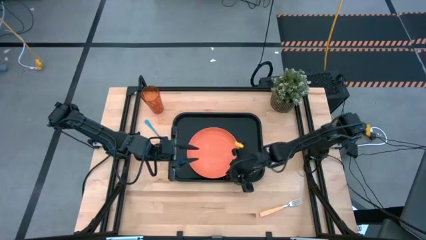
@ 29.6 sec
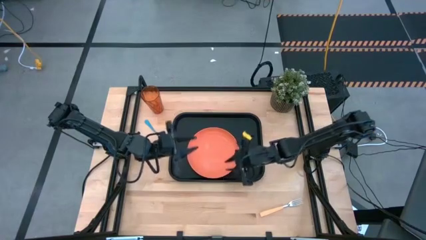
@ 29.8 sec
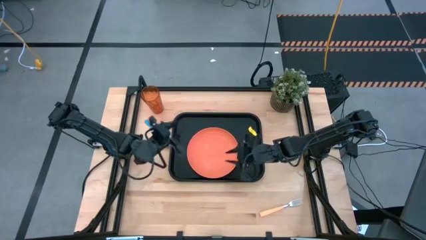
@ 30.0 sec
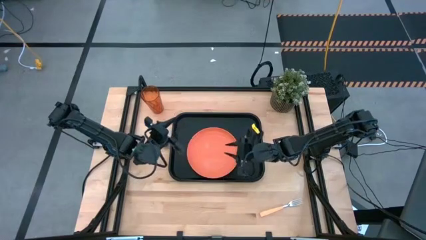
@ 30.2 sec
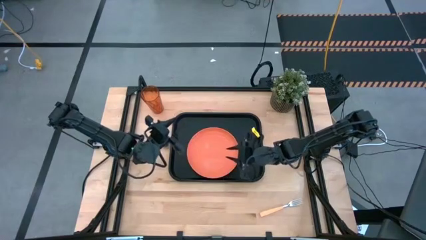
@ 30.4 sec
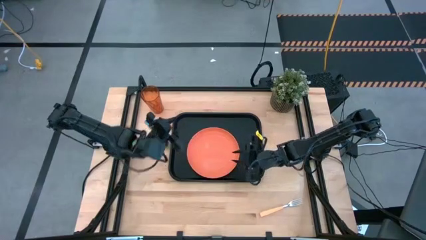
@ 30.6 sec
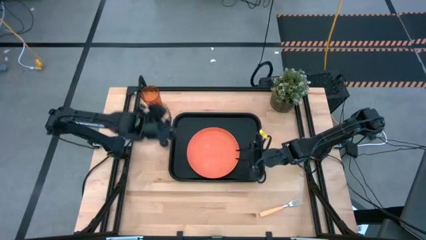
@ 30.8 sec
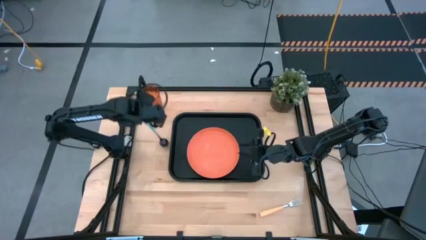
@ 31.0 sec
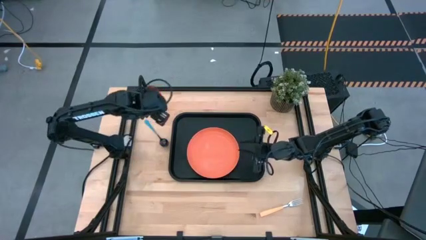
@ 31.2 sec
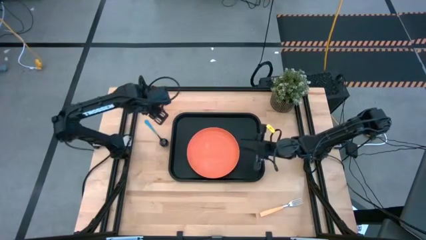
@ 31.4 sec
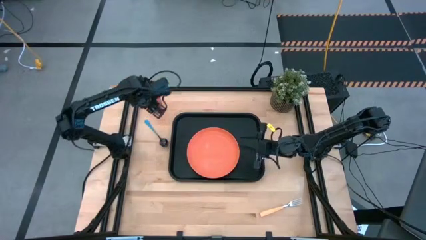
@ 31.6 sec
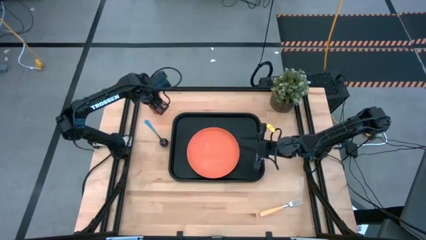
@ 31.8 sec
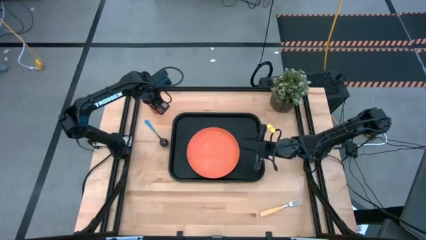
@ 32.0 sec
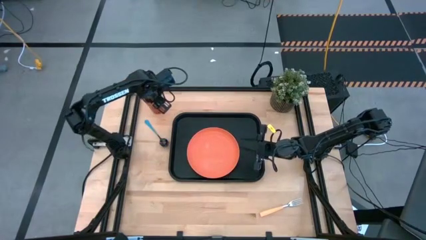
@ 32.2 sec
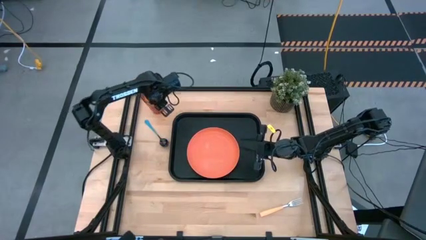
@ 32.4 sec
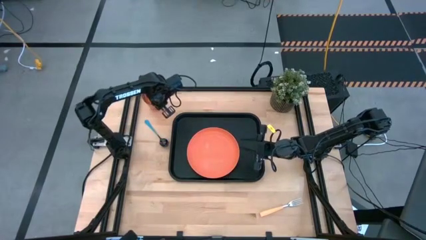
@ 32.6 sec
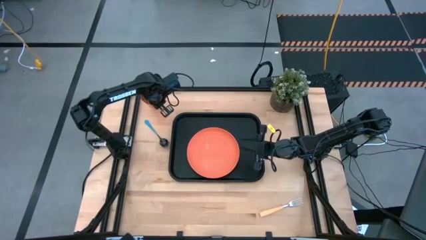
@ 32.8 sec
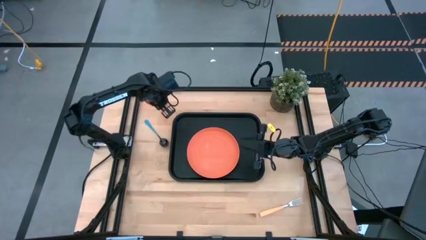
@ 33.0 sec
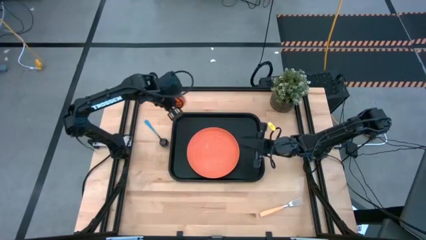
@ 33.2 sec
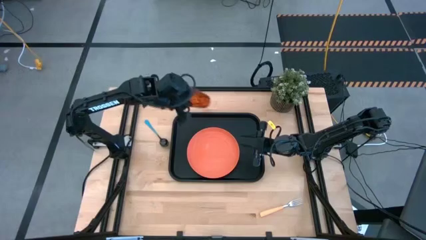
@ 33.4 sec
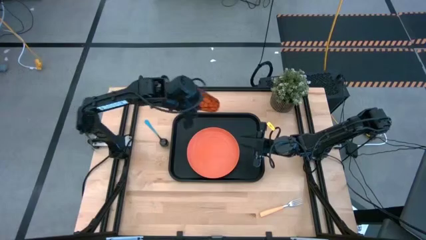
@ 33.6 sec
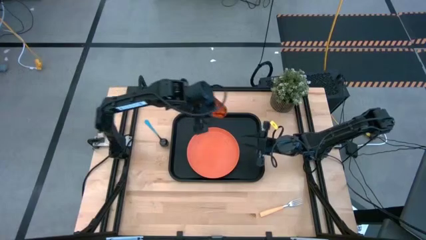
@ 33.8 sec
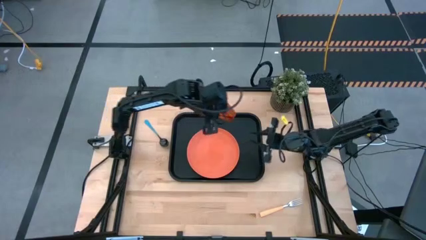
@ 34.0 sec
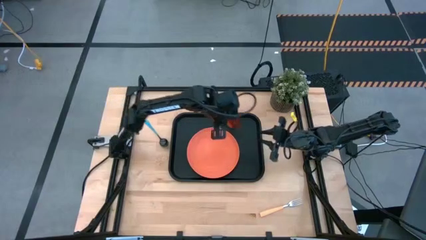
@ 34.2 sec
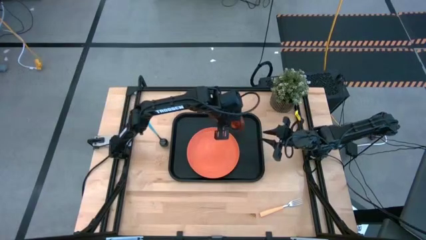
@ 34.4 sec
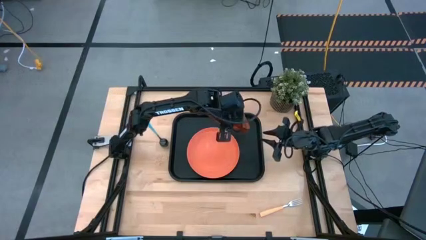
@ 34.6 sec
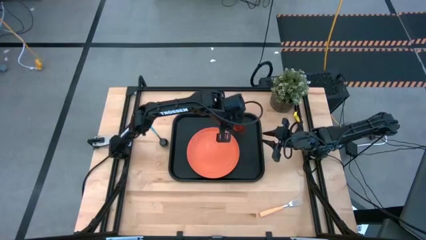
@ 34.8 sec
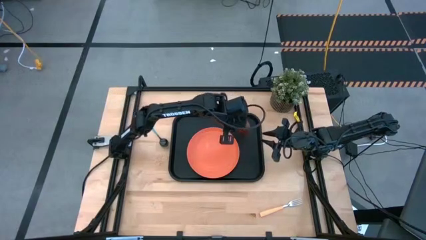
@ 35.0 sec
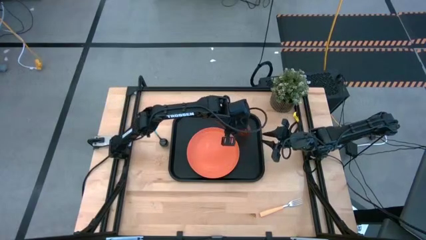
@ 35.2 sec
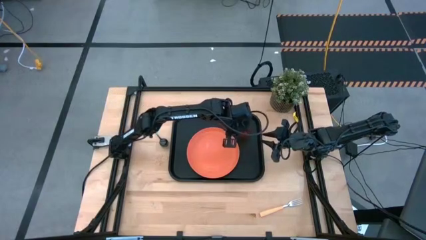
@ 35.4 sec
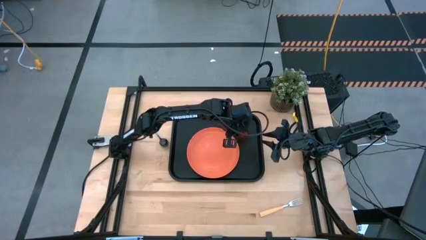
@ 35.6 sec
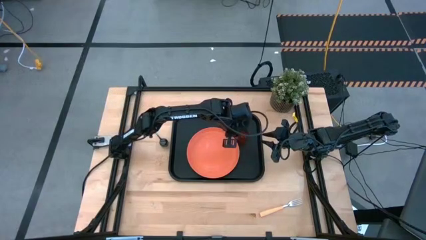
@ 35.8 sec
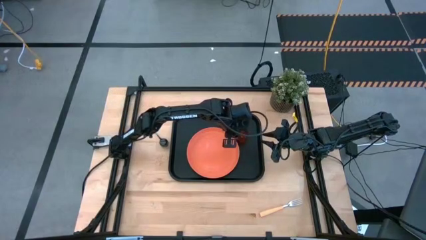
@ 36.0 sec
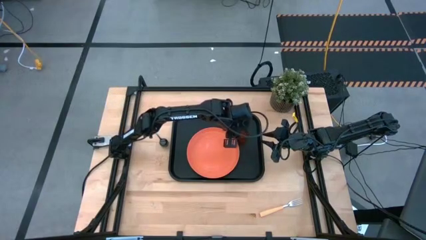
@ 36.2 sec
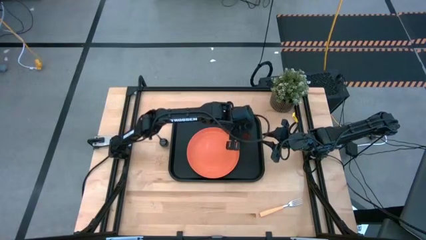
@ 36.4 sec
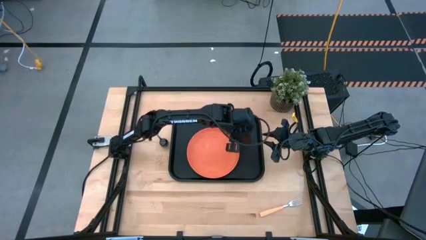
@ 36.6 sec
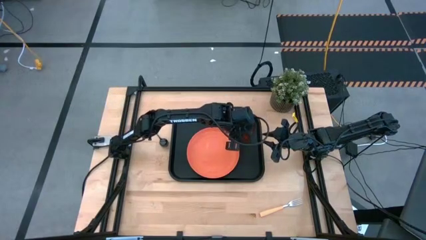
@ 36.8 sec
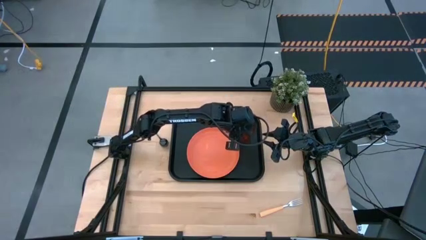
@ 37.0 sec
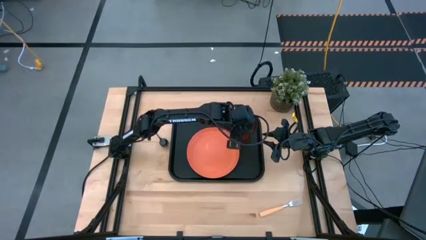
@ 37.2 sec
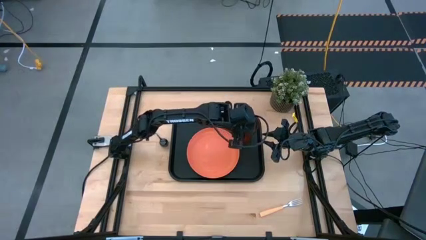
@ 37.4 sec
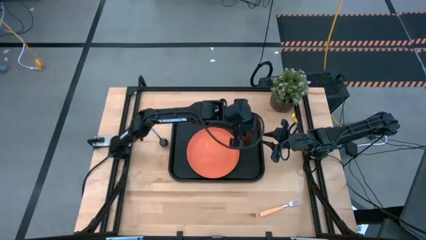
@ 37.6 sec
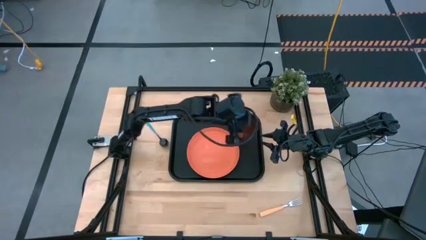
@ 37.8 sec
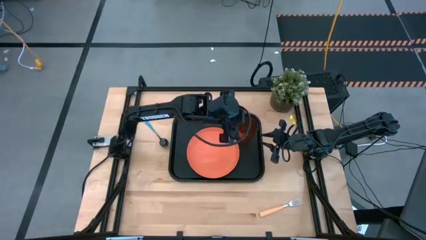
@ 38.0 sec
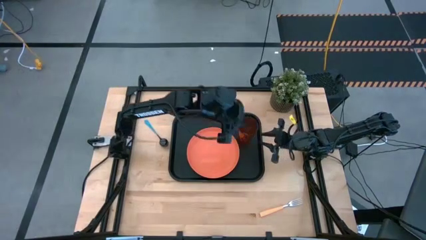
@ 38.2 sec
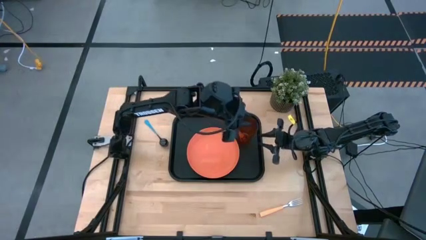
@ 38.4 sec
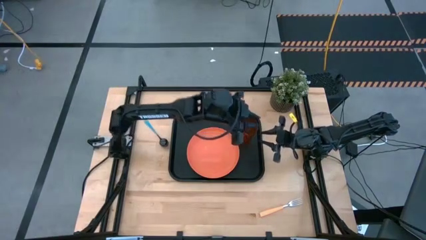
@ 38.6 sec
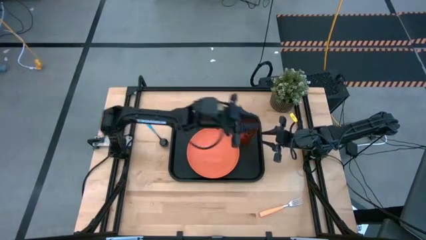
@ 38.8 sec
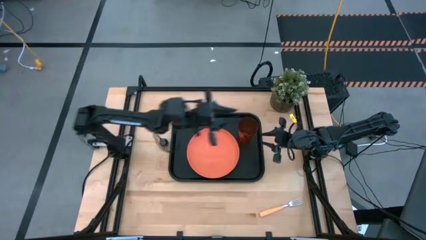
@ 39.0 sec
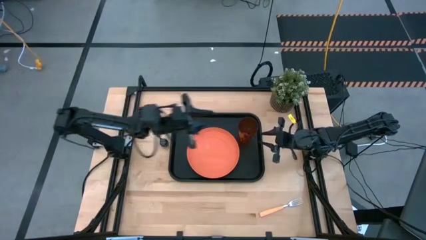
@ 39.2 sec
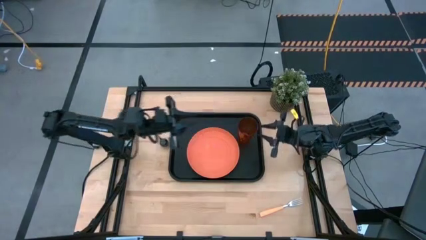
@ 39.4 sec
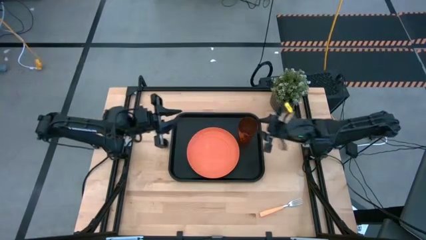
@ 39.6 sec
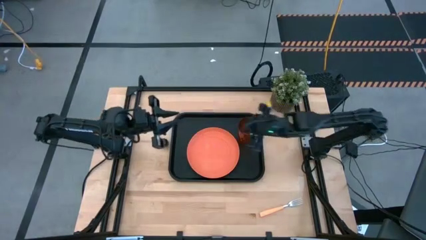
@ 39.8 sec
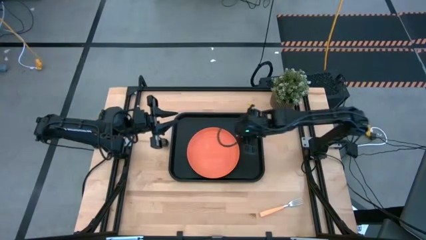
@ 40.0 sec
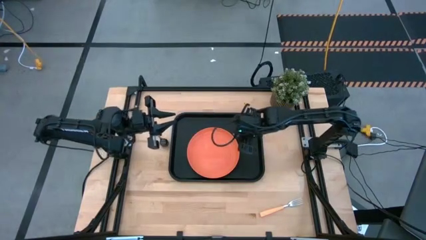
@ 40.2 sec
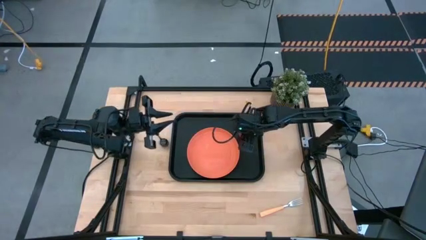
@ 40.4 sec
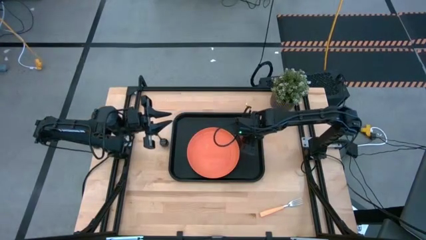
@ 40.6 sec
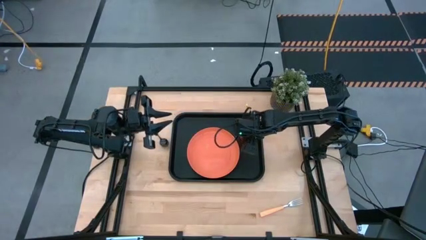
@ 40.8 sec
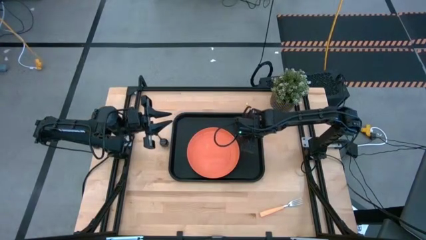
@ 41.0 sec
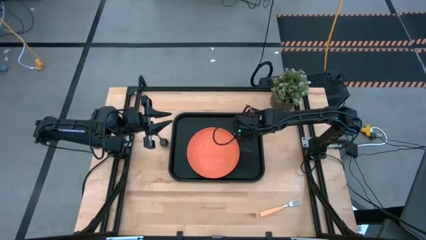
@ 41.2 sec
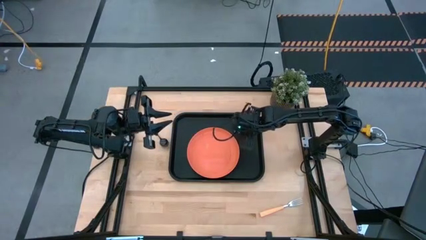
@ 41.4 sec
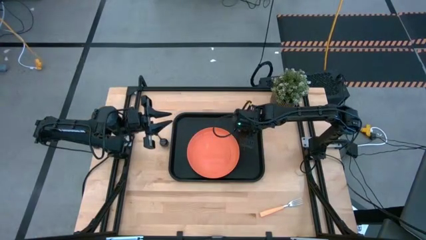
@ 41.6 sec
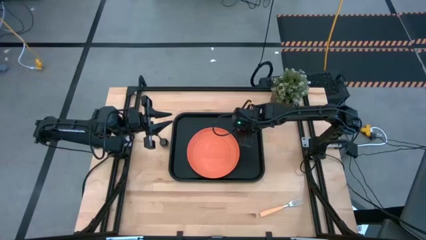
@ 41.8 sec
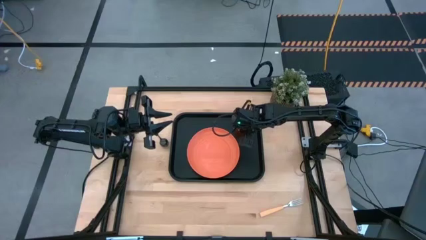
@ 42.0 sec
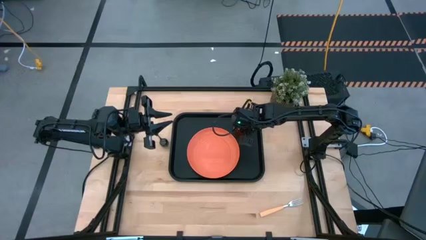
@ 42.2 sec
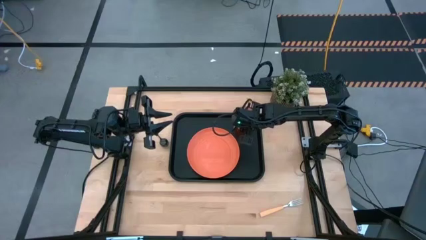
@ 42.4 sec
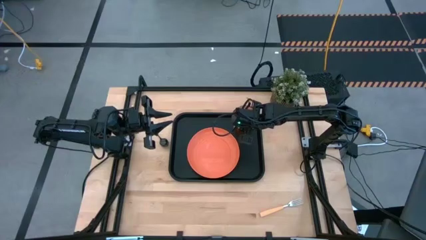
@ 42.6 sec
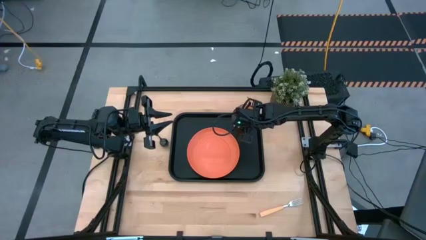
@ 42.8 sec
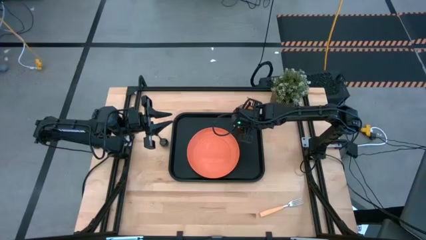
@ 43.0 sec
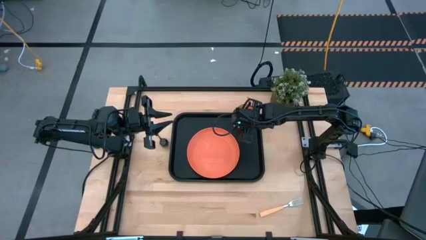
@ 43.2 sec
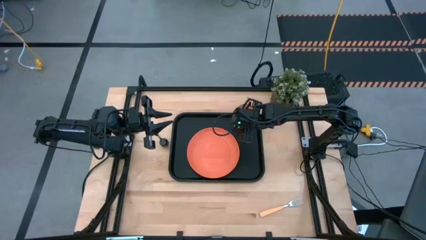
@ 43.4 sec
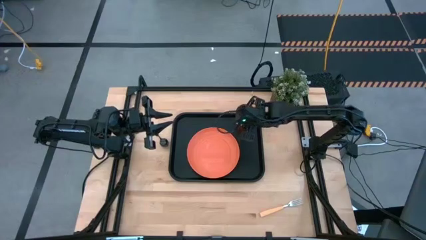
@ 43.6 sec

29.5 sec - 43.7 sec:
Task: Pick and place plate/cup/fork/spoon on tray
Put the orange cup on the black serving tray to the top right of the orange plate
